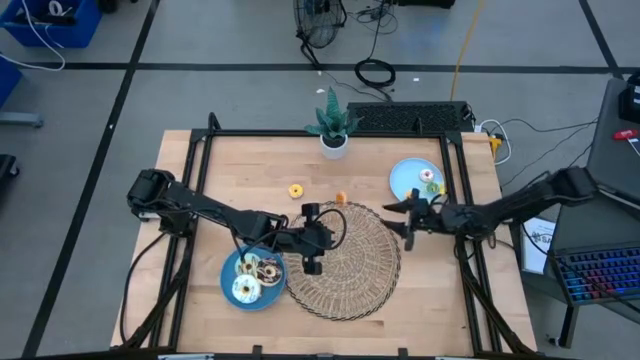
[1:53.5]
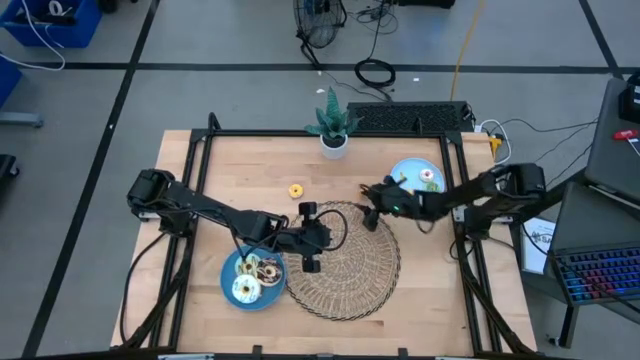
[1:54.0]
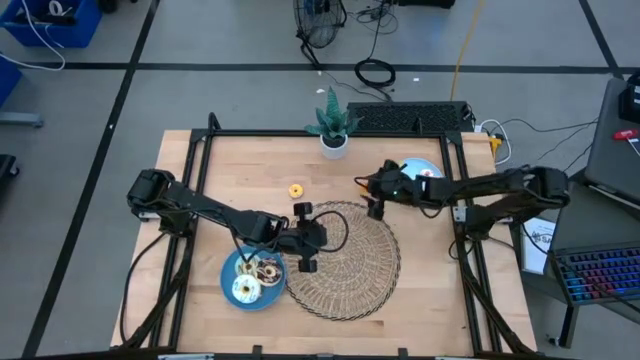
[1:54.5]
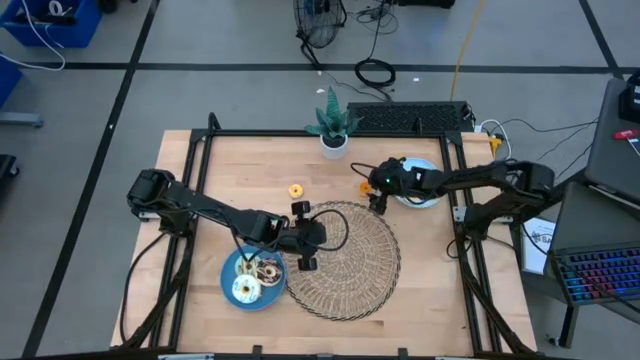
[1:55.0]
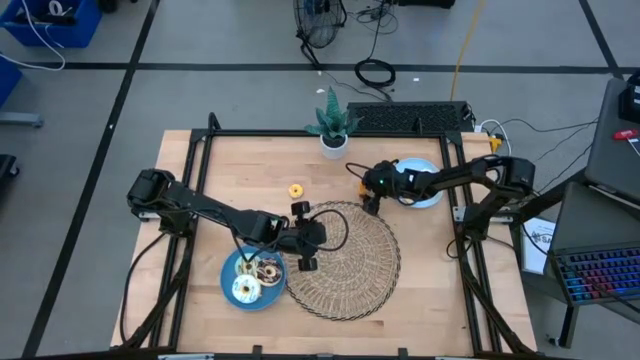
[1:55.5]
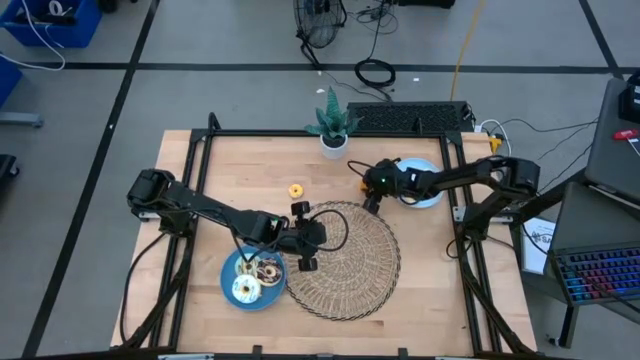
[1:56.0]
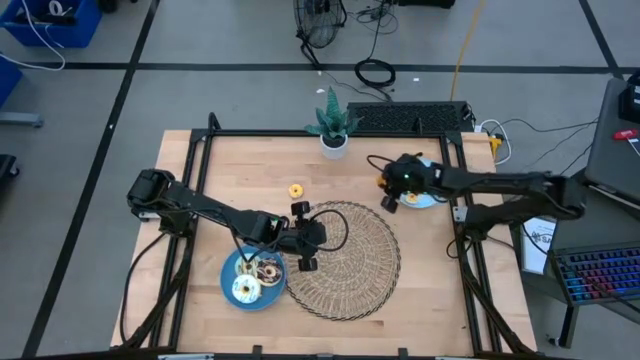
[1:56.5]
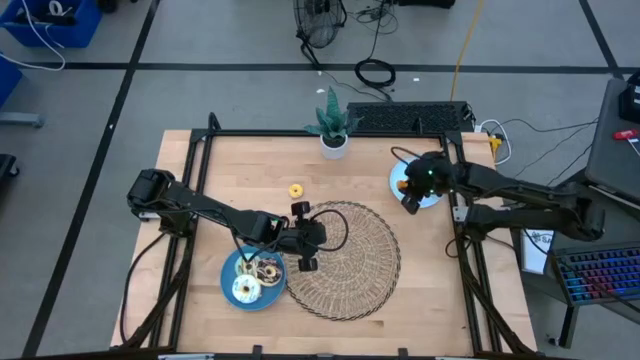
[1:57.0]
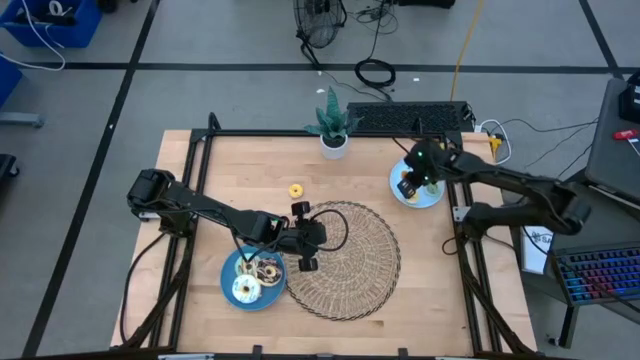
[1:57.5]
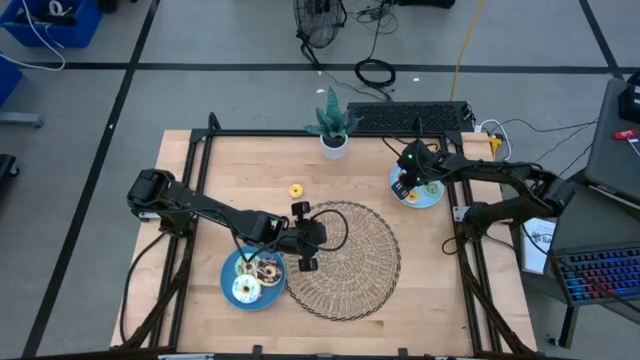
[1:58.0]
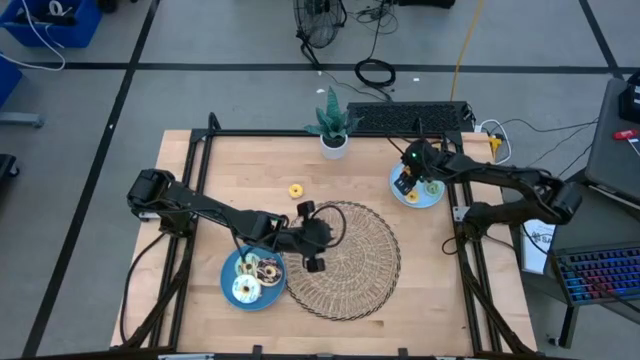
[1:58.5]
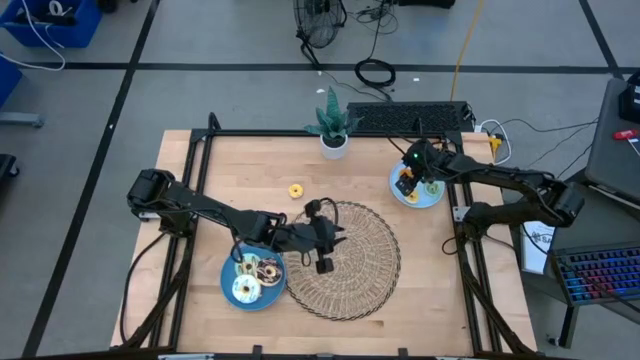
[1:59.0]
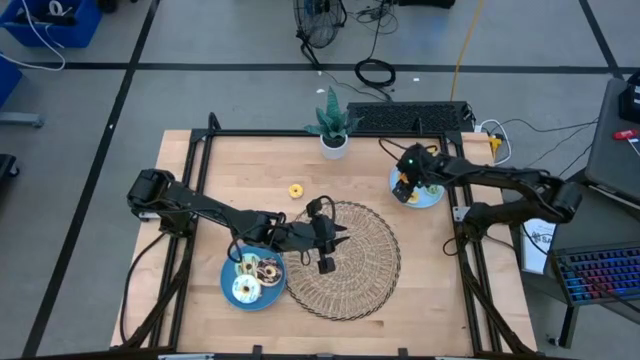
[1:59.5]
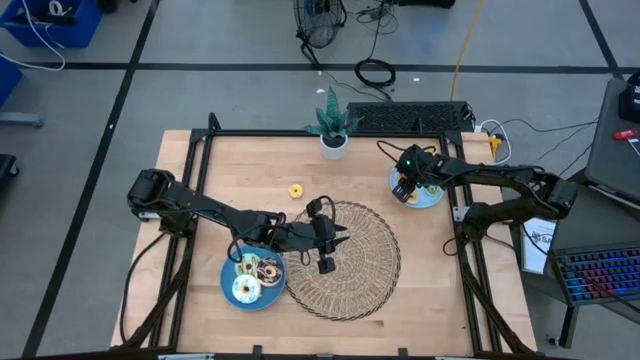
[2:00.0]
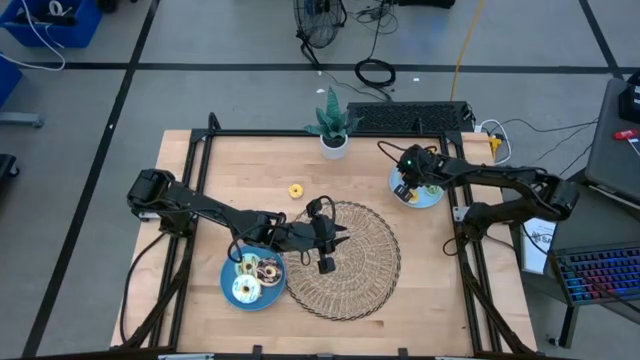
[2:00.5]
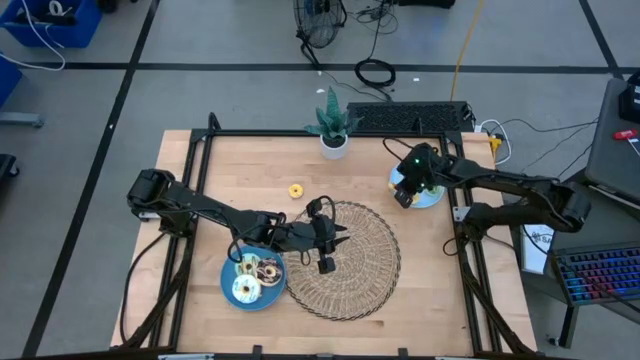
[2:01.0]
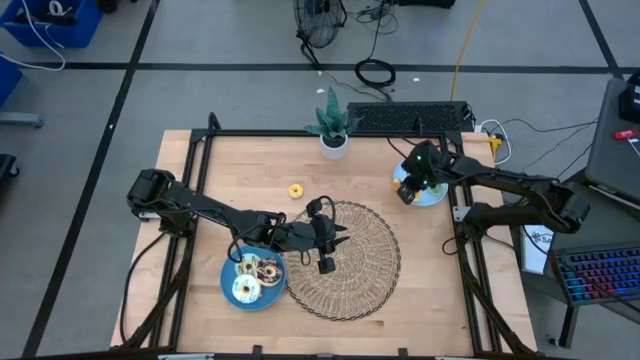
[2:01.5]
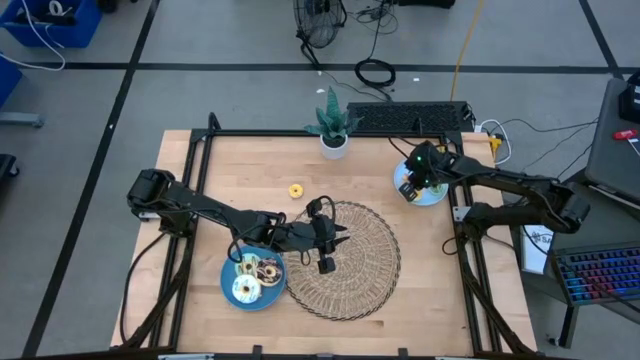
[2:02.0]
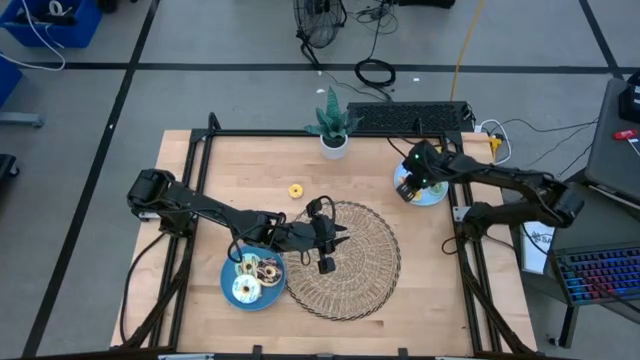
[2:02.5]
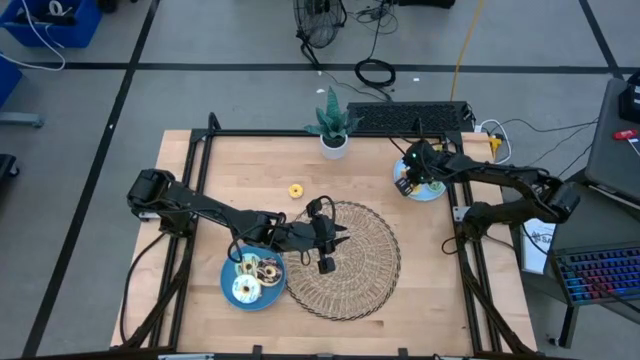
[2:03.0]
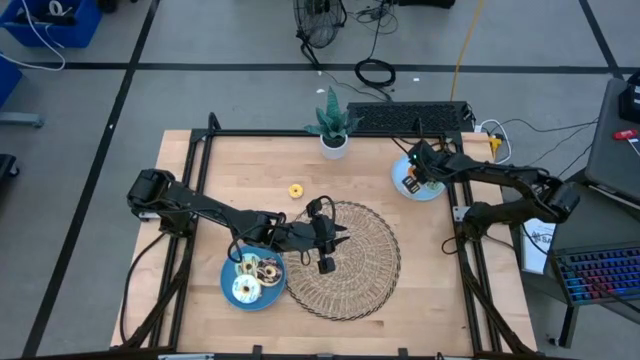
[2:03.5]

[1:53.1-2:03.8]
Task: Pick & Place donuts
Put the small orange donut on the light blue plate

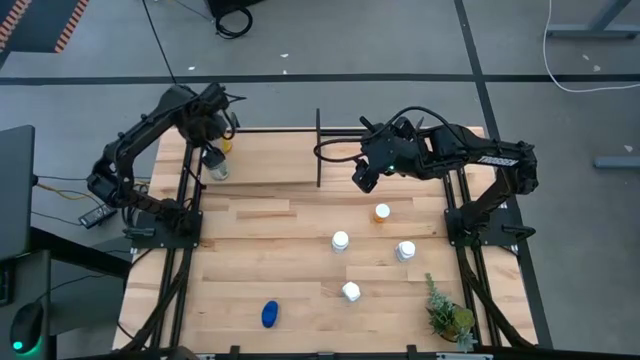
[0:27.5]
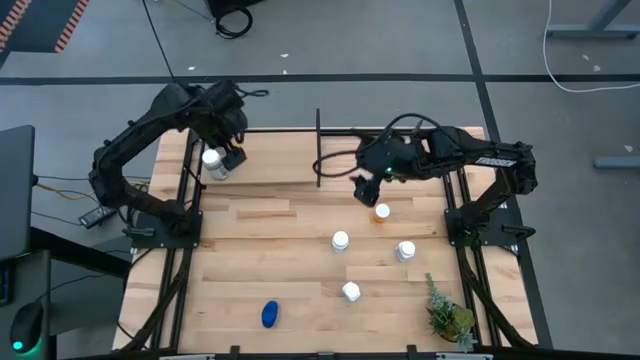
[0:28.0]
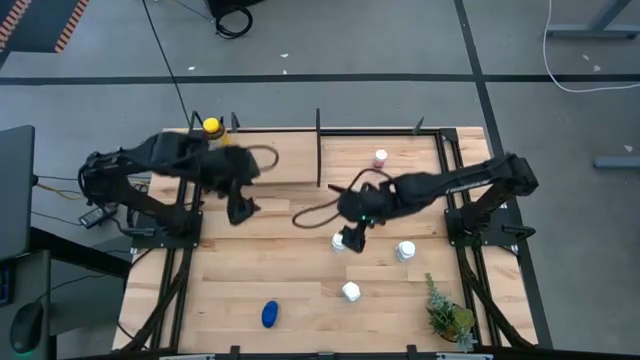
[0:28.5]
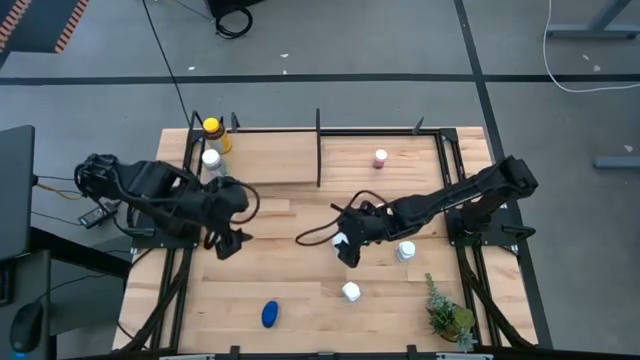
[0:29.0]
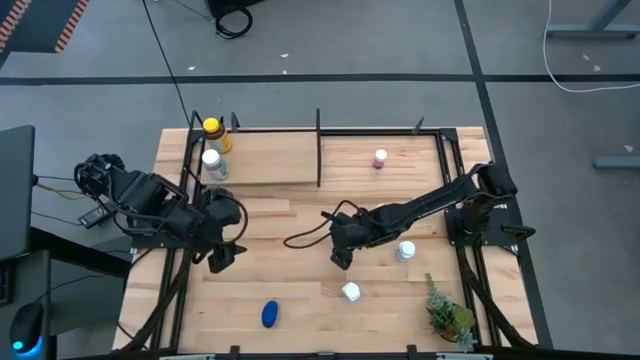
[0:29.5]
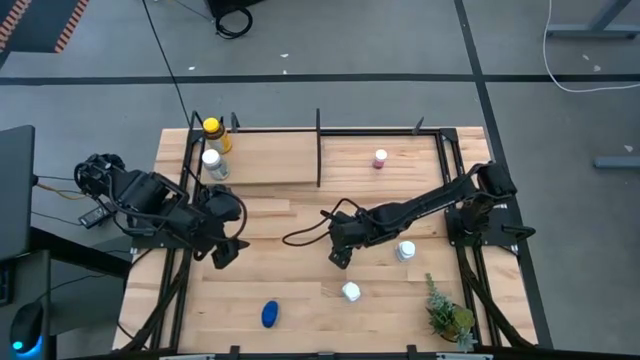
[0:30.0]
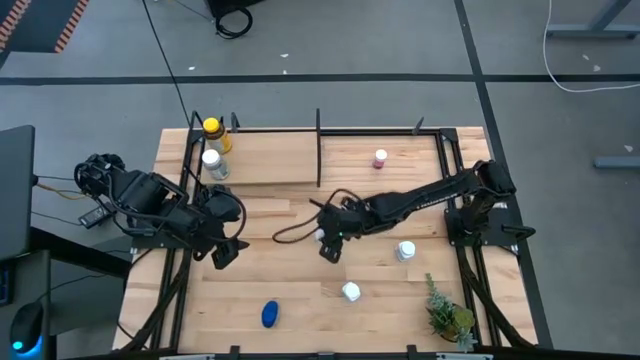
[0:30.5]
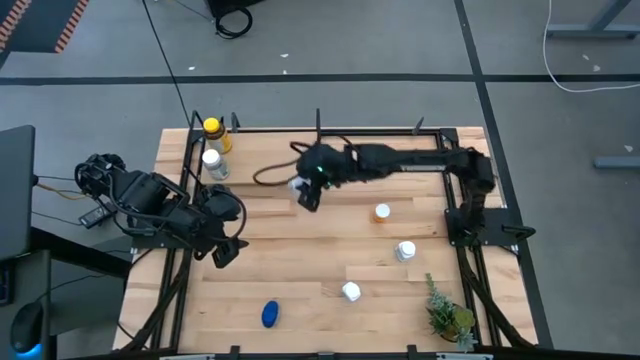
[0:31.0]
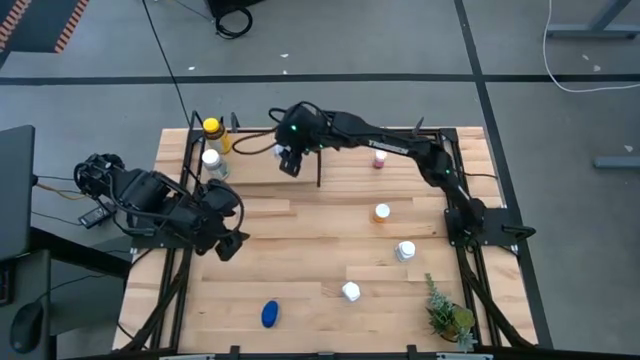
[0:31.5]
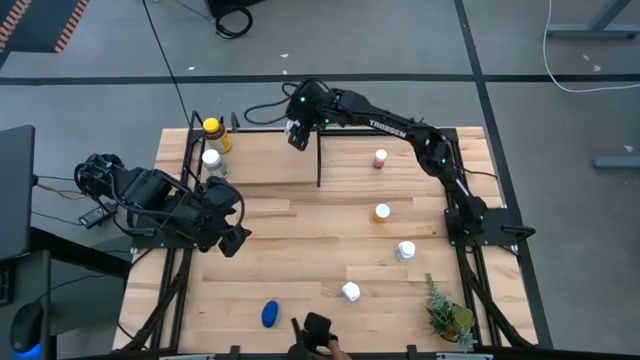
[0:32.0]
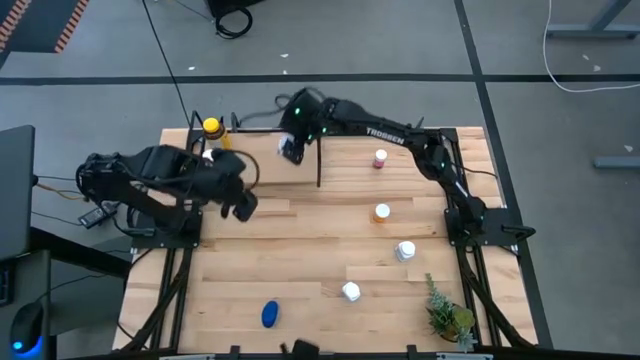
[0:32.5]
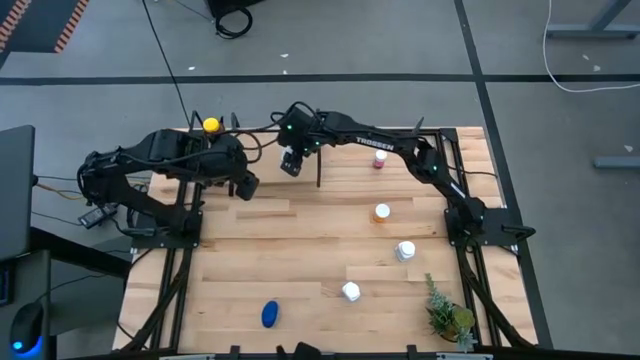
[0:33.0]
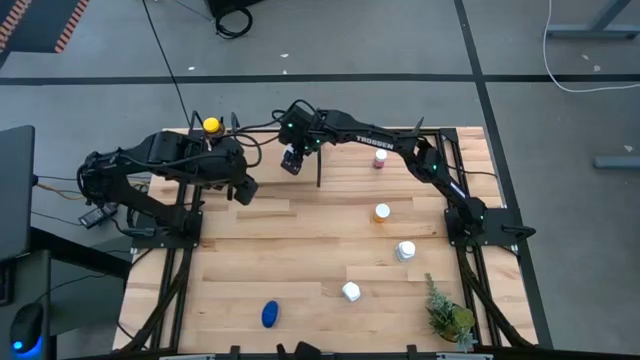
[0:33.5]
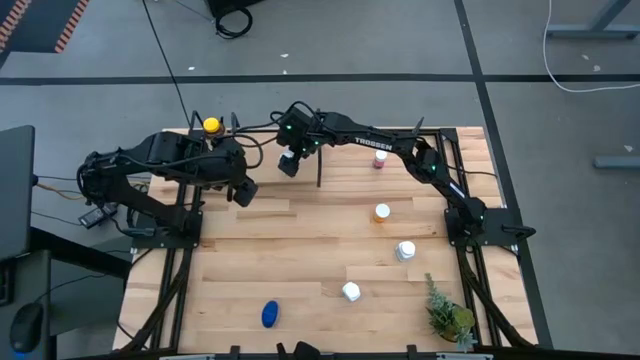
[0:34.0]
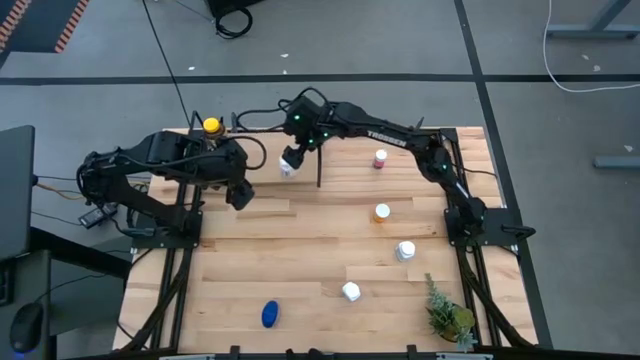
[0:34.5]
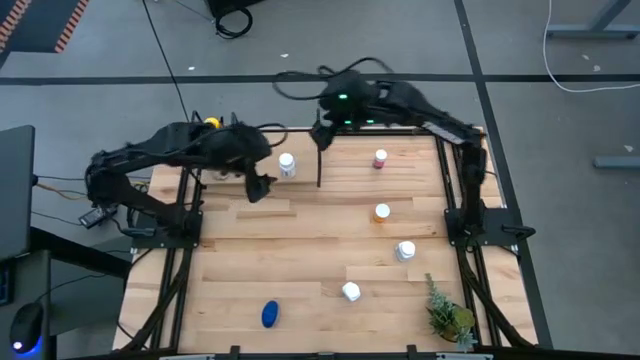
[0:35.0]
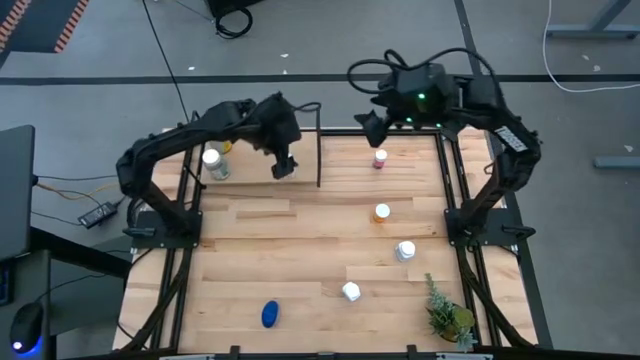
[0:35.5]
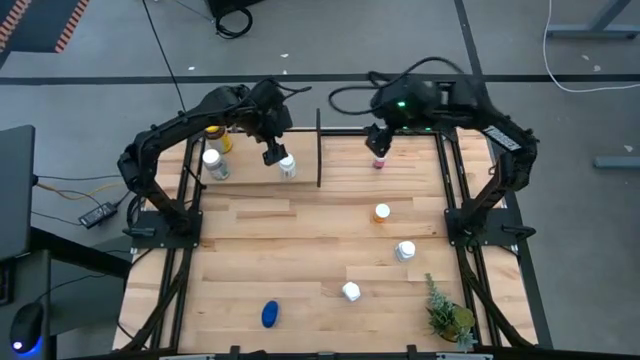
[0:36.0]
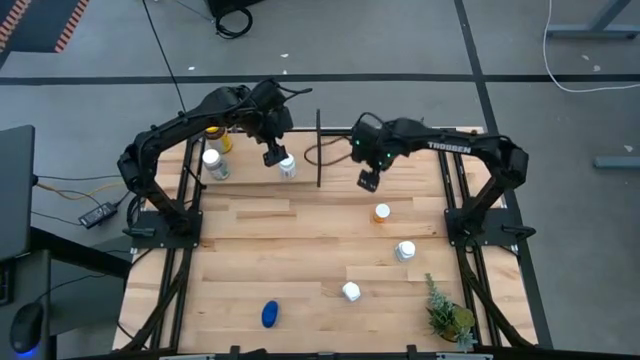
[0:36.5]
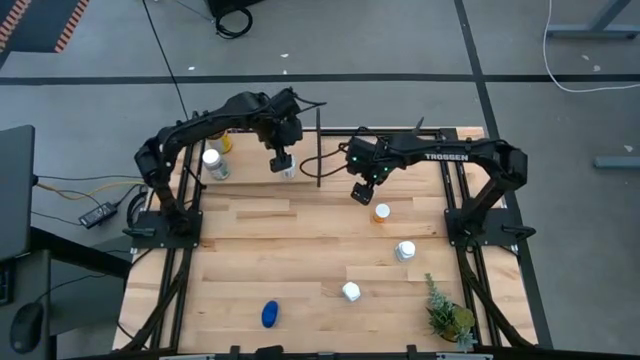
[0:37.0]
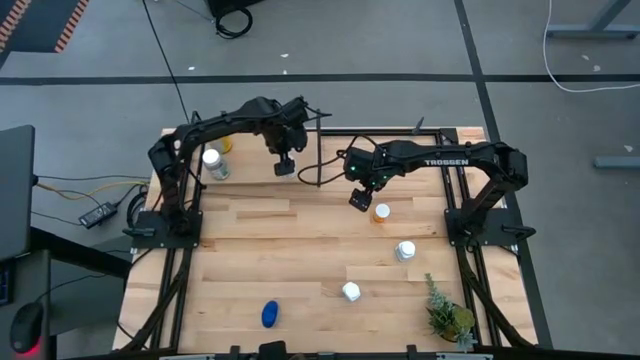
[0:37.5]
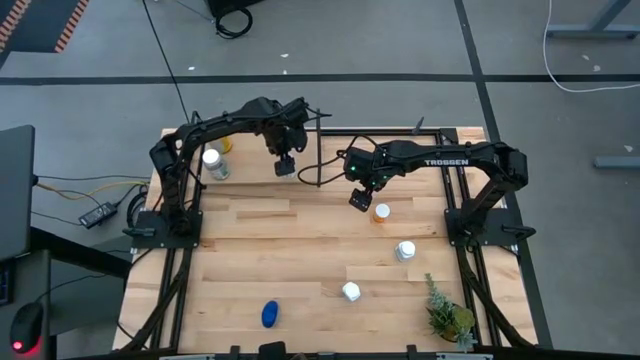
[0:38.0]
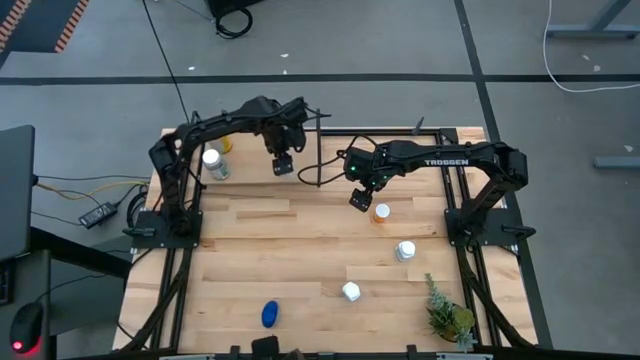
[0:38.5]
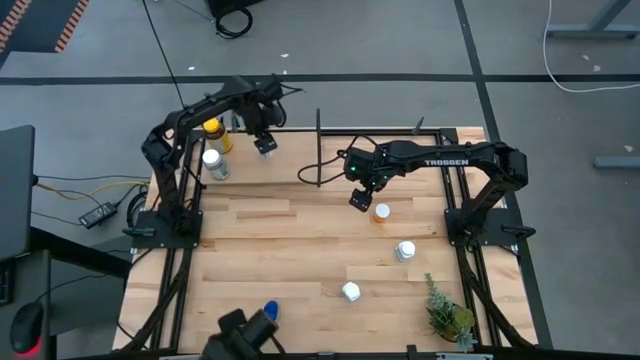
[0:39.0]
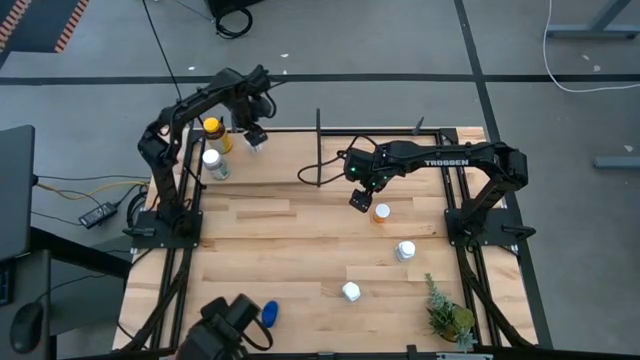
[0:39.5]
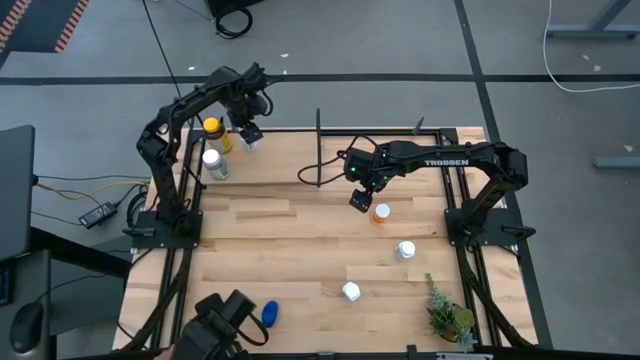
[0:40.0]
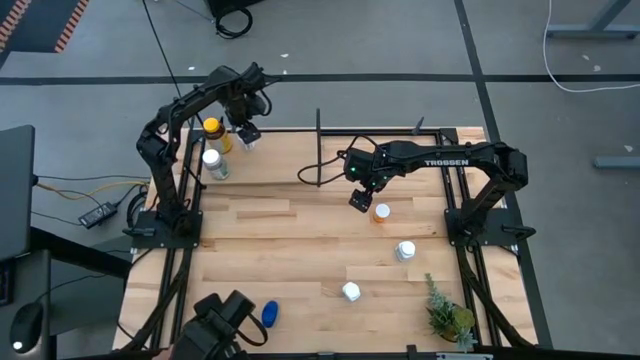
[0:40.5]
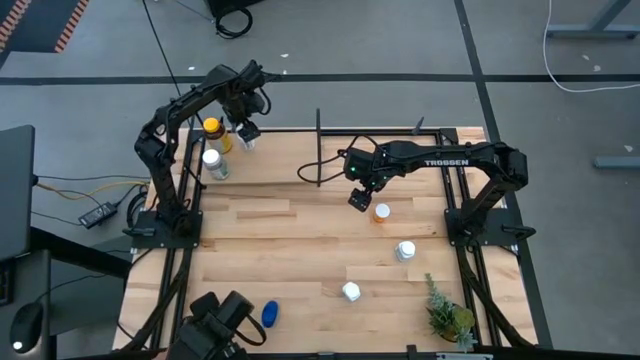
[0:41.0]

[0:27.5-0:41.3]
Task: Pick and place medicine bottles onto shelf by color
Put the white medicine bottle on the shelf
